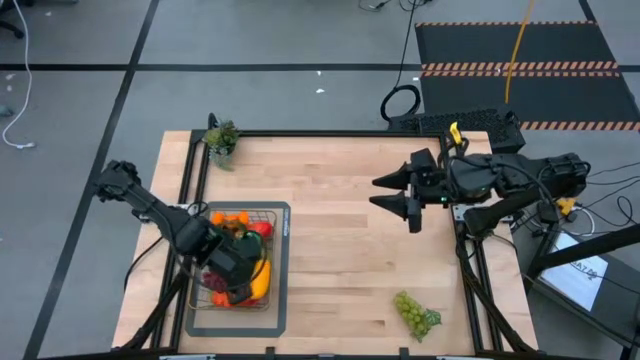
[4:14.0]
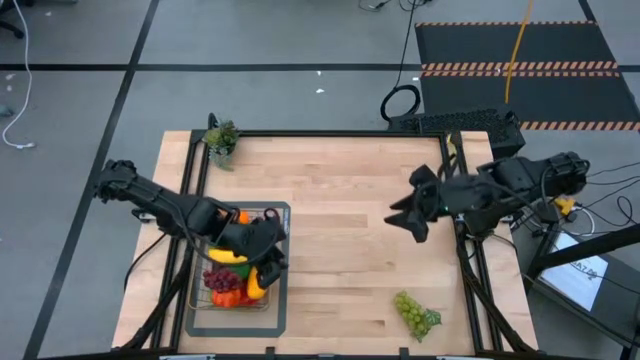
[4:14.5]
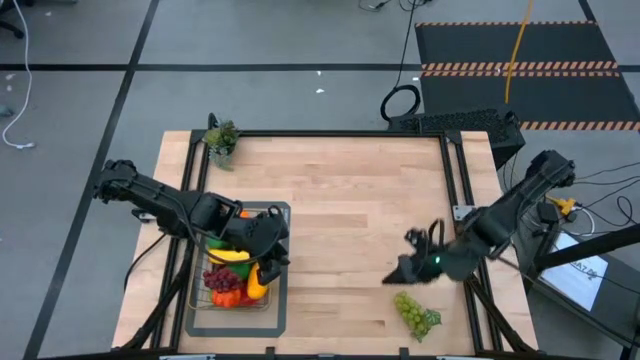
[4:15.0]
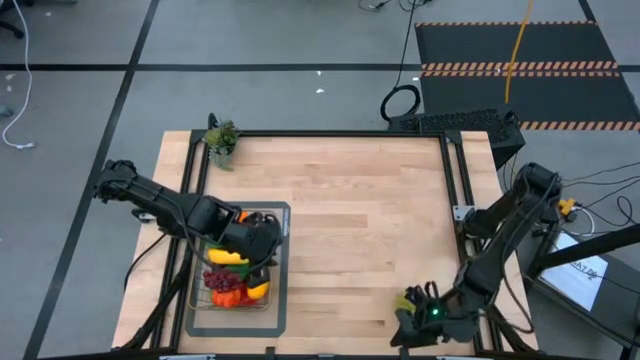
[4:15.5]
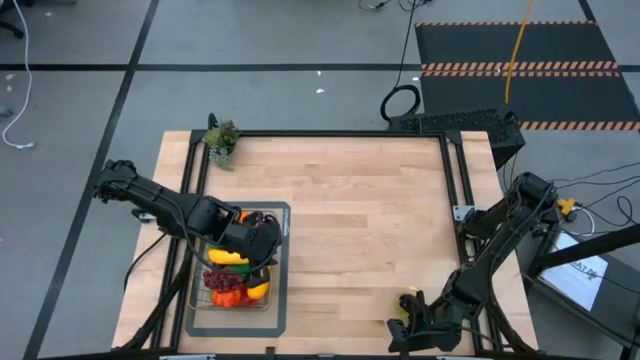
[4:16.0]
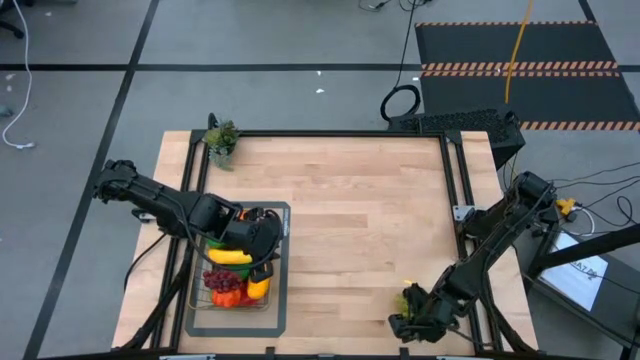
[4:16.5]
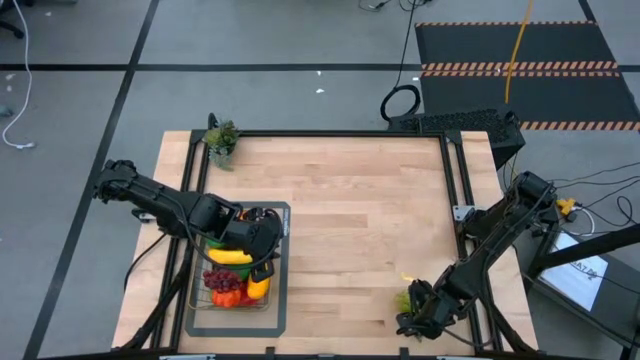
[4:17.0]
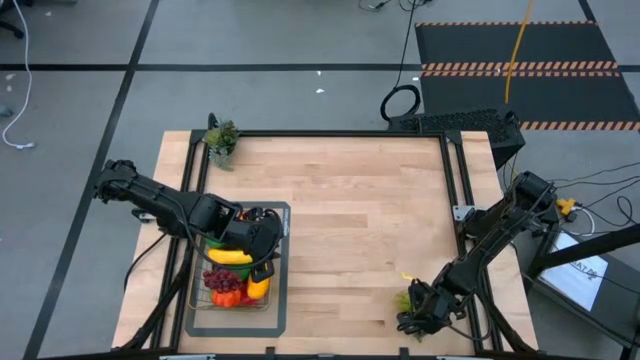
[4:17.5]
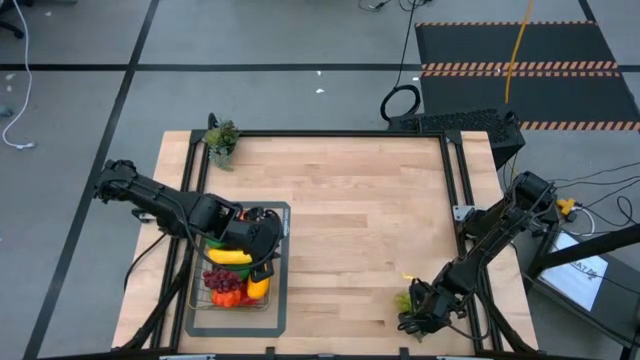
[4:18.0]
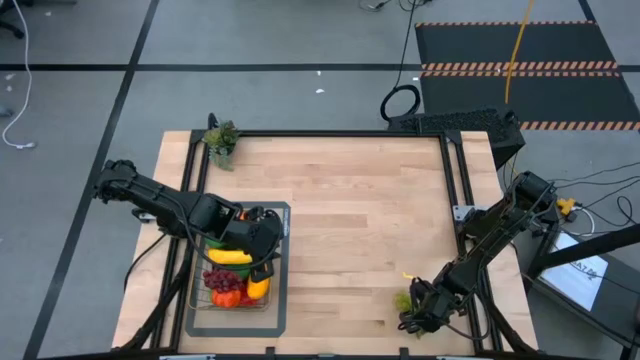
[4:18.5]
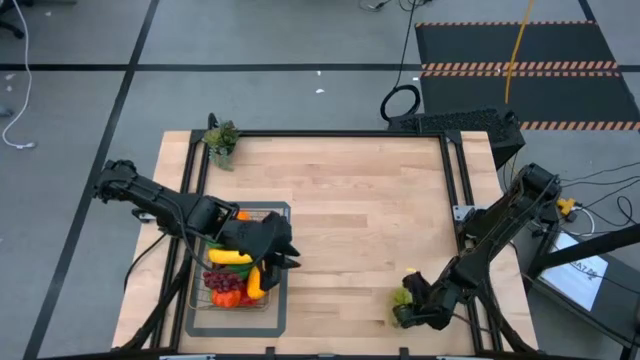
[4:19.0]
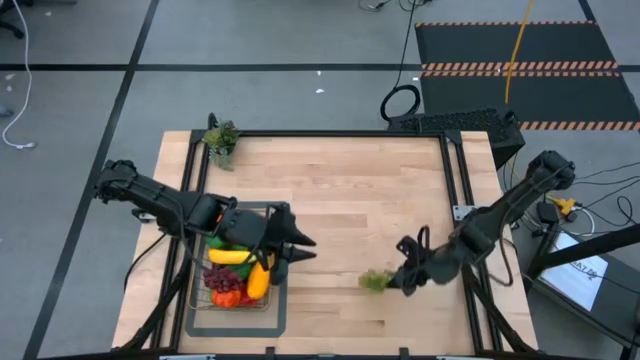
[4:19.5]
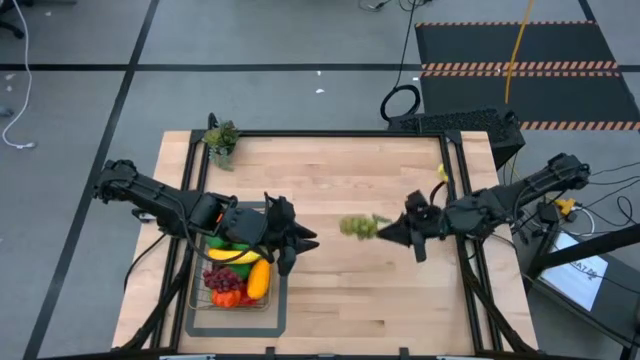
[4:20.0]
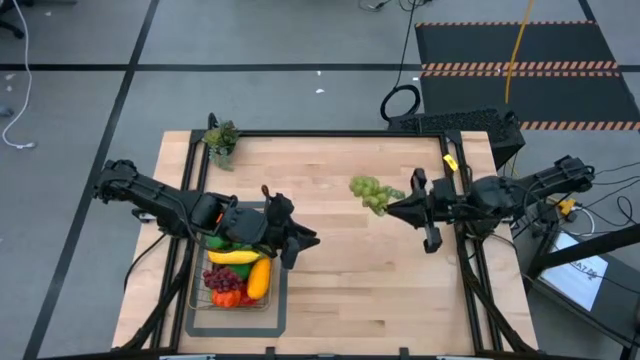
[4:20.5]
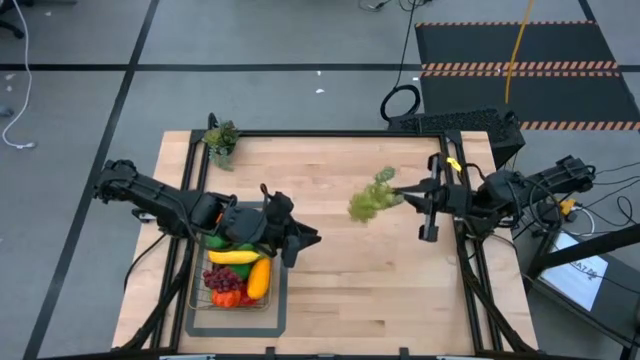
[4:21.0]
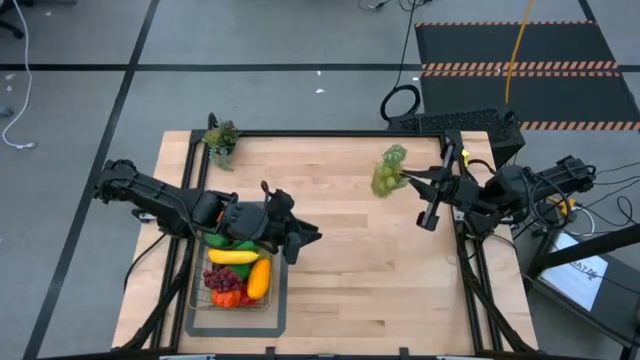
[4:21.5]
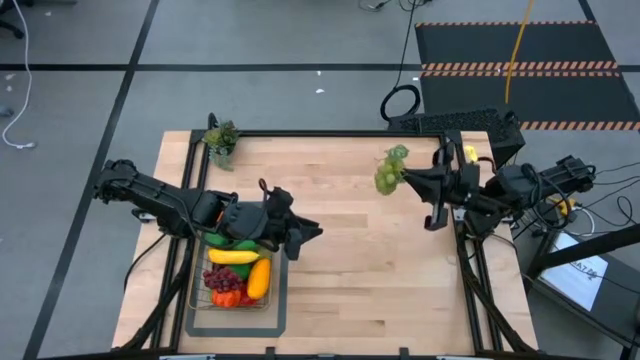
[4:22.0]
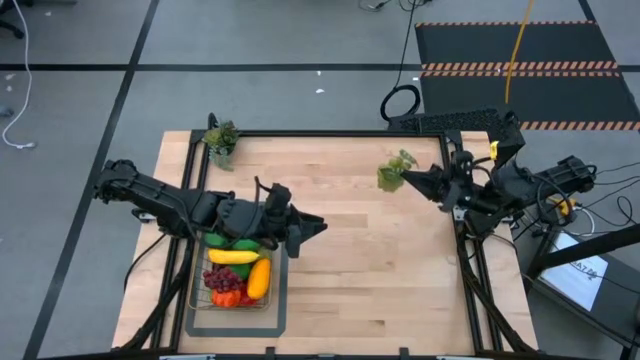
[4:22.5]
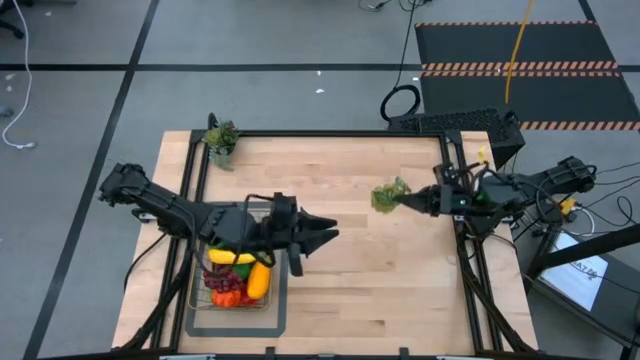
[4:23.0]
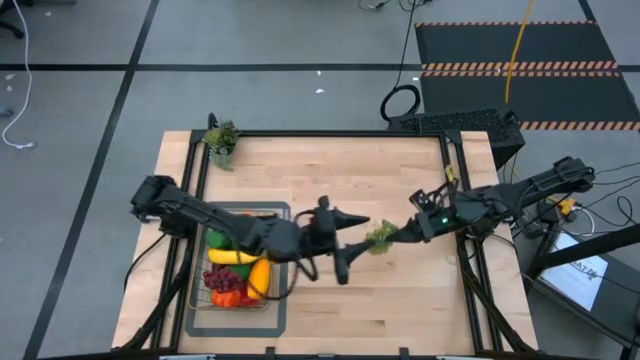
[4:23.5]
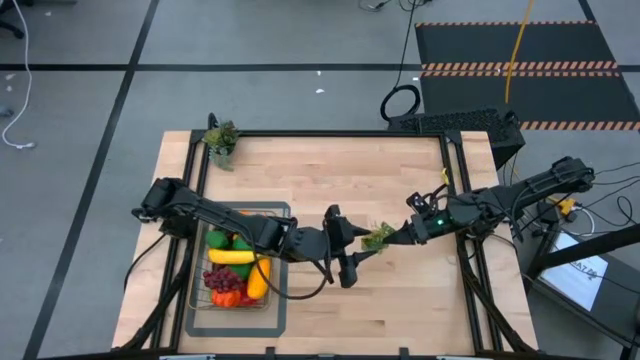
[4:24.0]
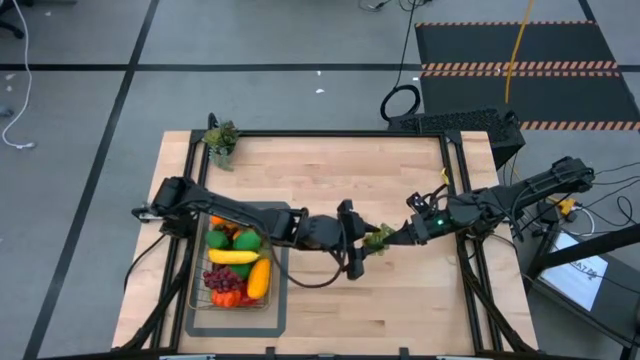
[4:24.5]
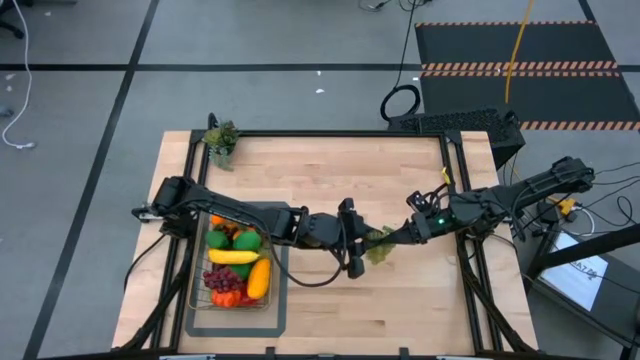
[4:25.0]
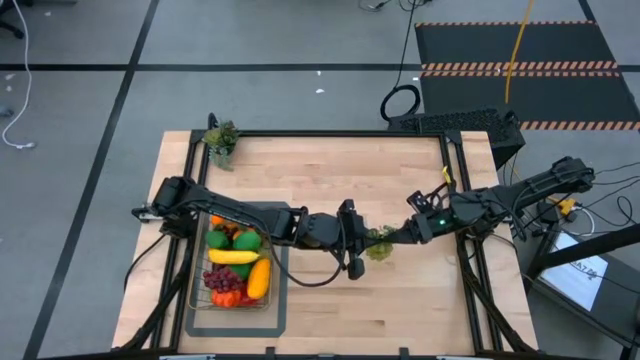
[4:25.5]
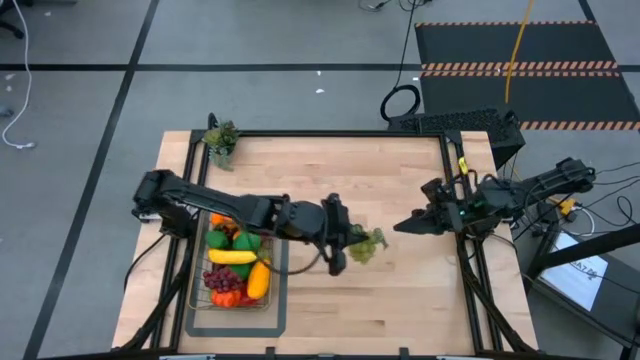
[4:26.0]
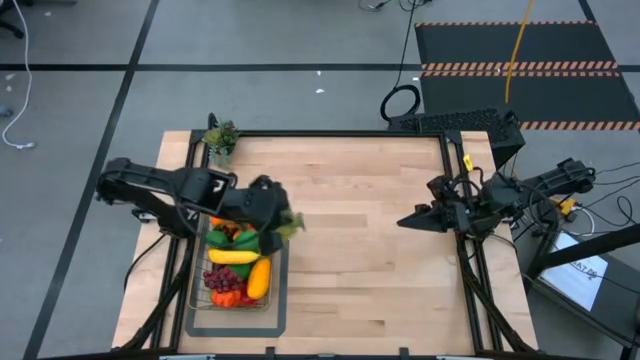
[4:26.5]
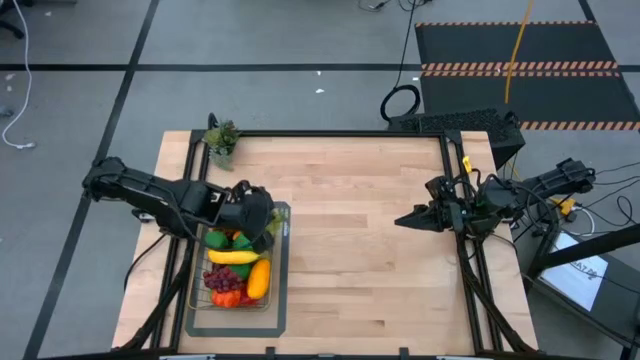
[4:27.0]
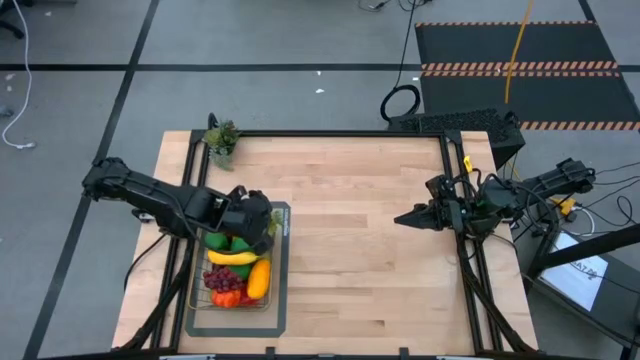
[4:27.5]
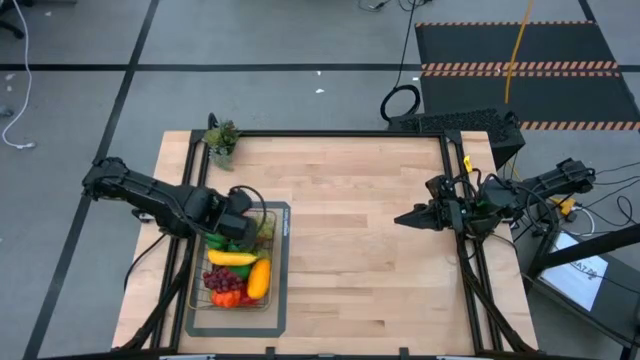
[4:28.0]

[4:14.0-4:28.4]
Task: Build produce basket
Put the green grapes into the wire basket

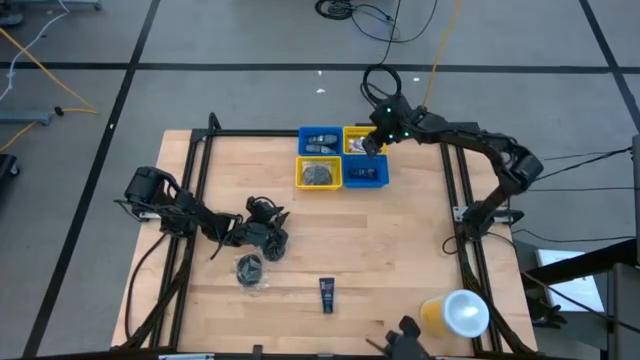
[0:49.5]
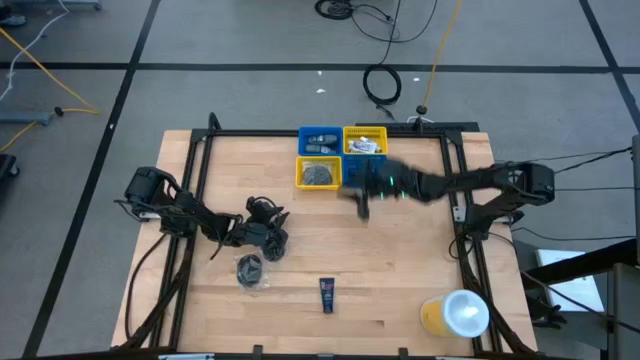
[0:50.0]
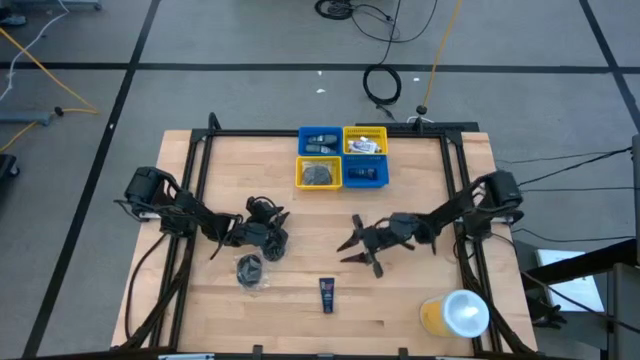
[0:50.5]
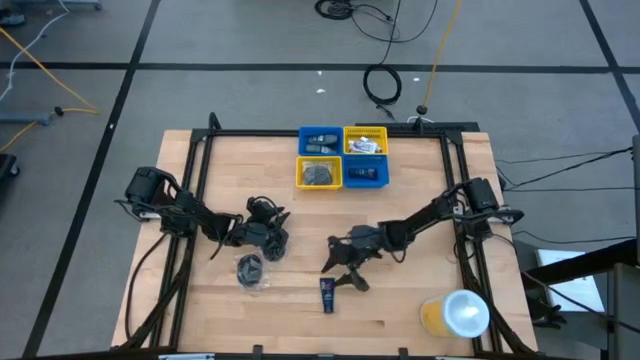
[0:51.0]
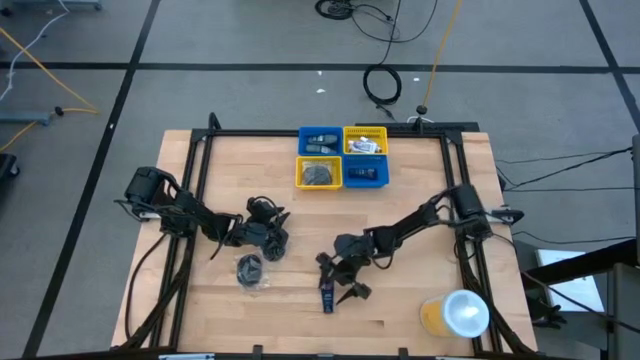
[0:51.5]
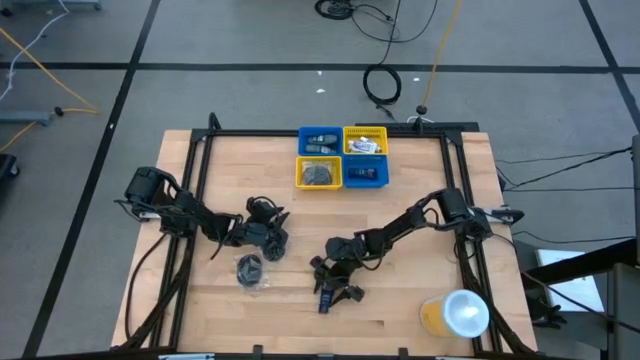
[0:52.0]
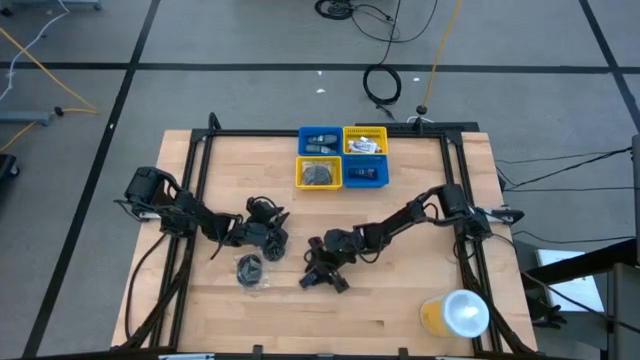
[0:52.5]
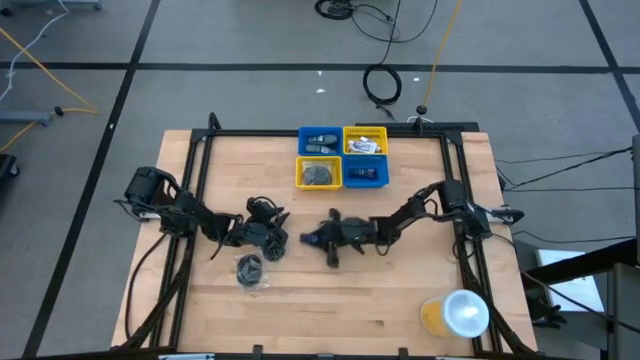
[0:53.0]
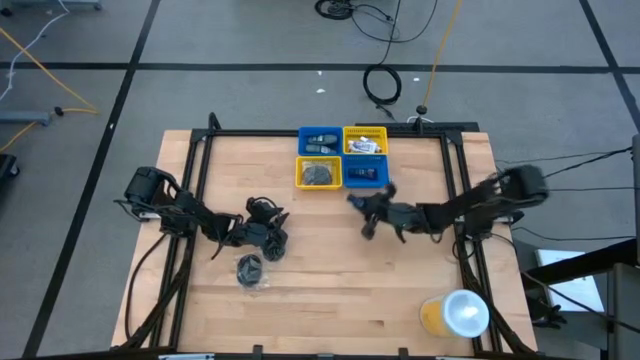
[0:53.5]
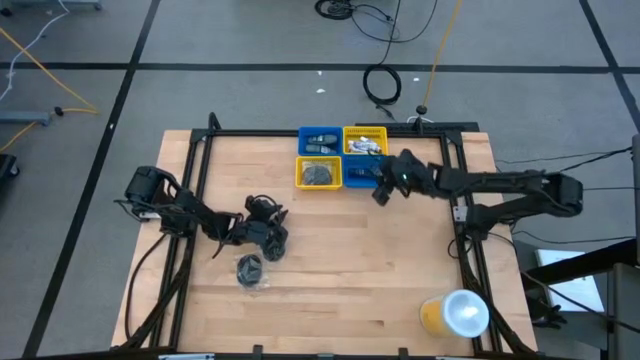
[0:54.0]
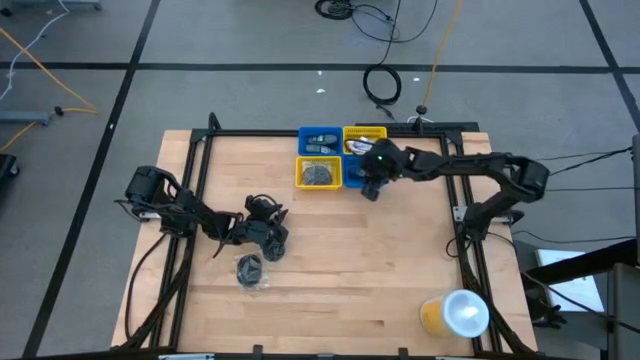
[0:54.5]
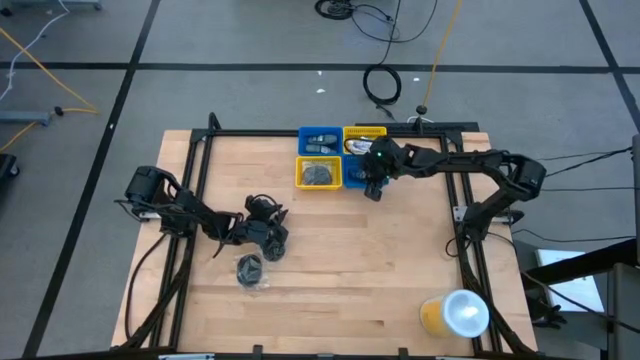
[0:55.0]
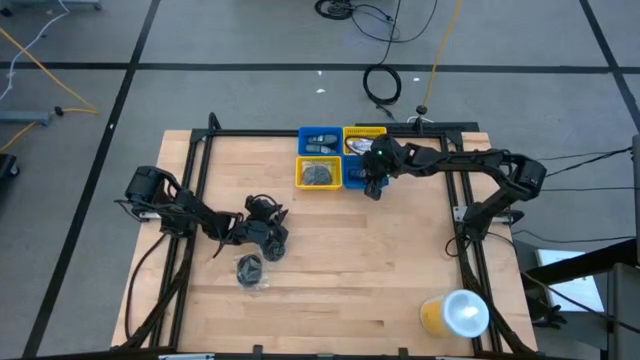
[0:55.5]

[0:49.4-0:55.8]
Task: Pick & Place Travel size toiletries
Put the blue shave cream into the right blue bin
